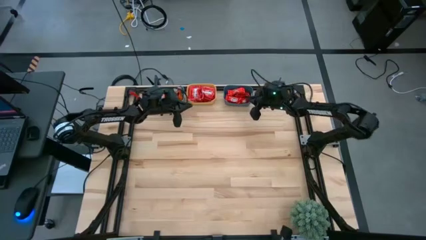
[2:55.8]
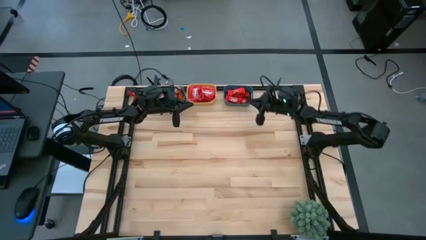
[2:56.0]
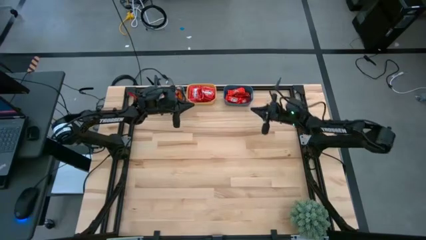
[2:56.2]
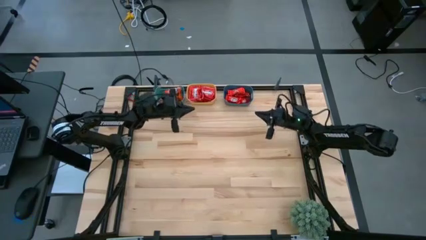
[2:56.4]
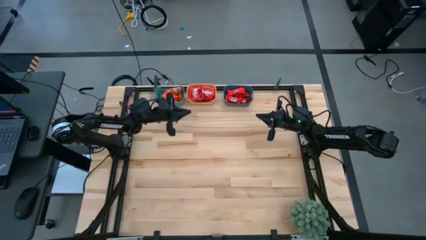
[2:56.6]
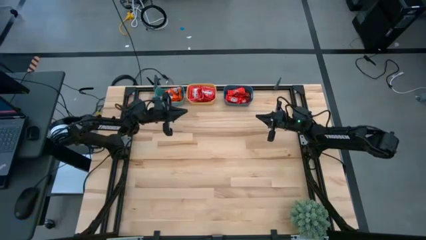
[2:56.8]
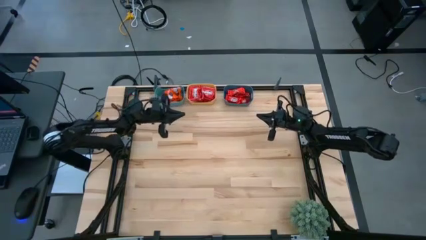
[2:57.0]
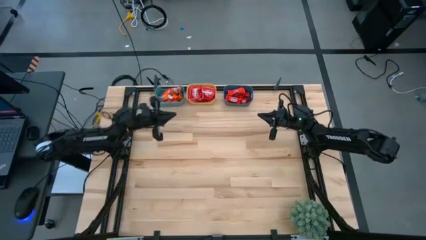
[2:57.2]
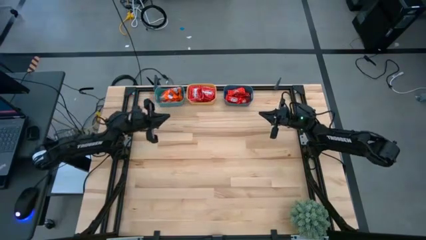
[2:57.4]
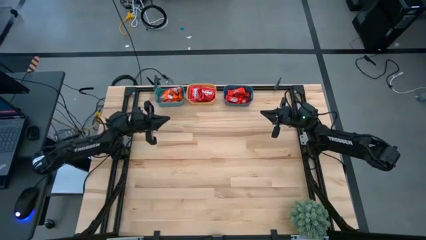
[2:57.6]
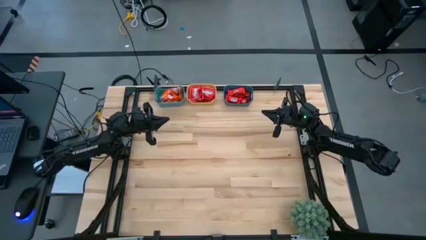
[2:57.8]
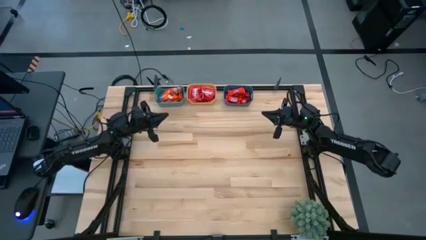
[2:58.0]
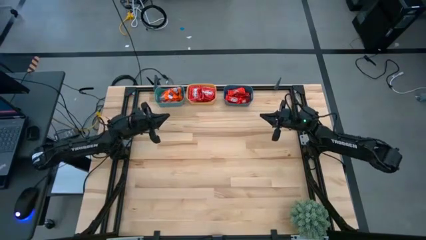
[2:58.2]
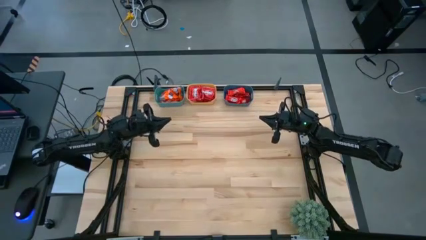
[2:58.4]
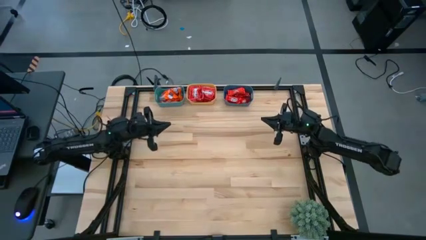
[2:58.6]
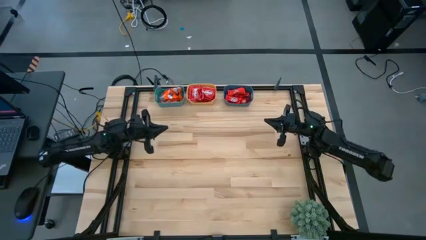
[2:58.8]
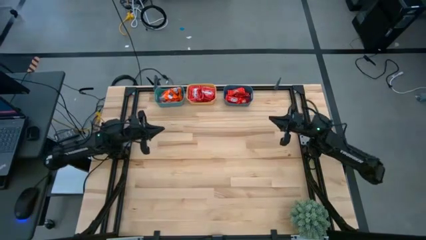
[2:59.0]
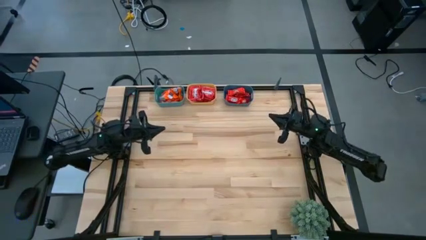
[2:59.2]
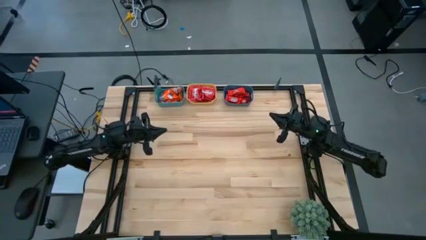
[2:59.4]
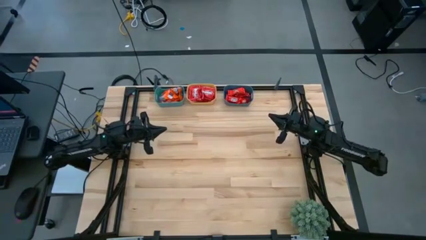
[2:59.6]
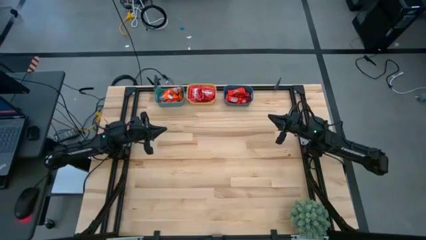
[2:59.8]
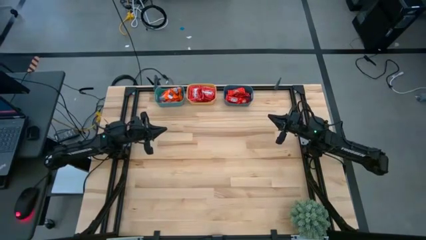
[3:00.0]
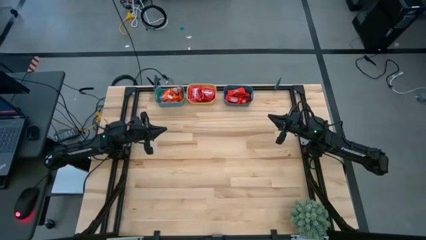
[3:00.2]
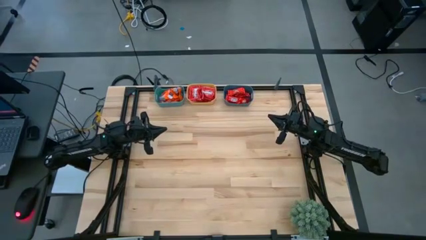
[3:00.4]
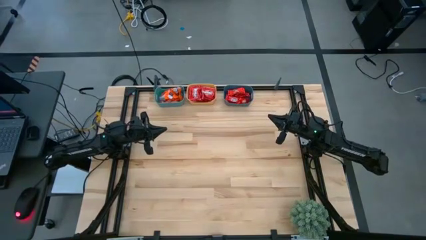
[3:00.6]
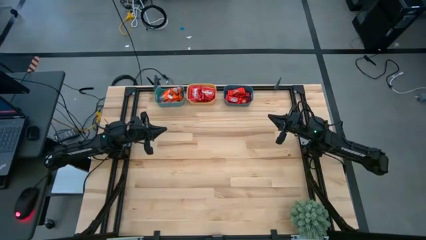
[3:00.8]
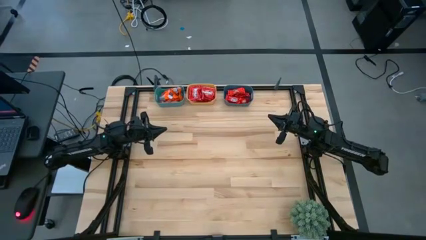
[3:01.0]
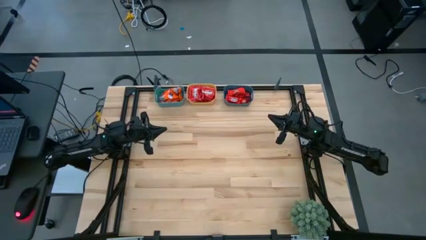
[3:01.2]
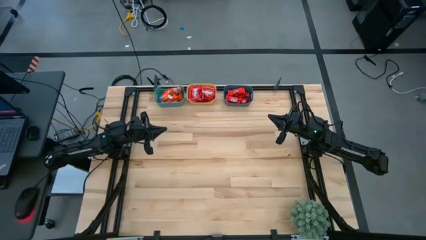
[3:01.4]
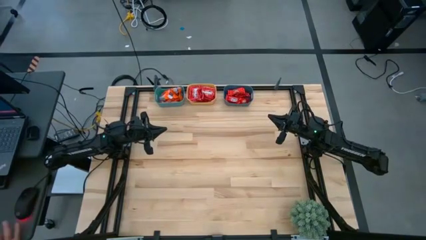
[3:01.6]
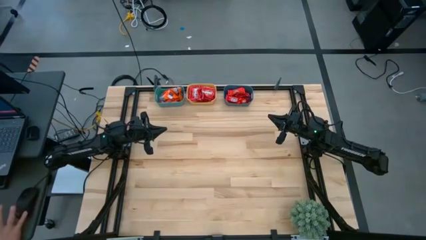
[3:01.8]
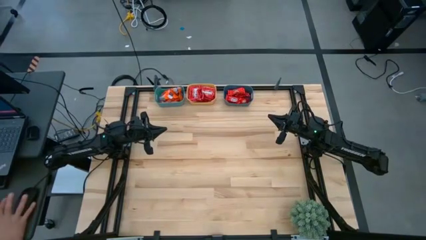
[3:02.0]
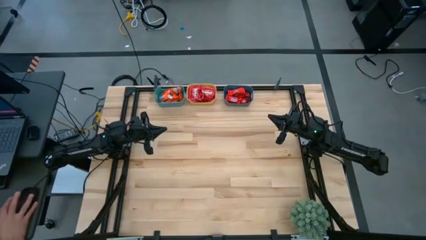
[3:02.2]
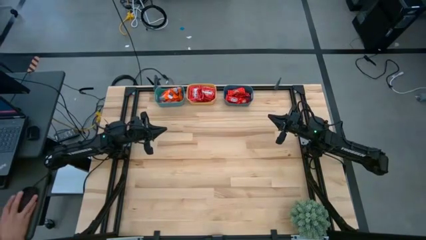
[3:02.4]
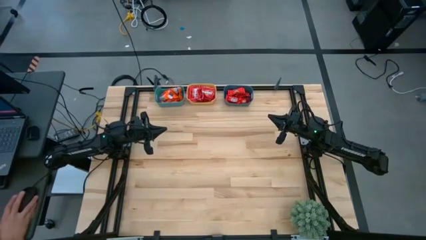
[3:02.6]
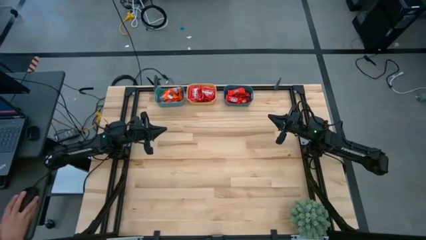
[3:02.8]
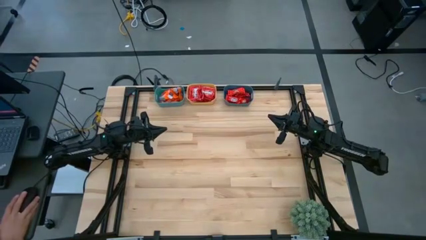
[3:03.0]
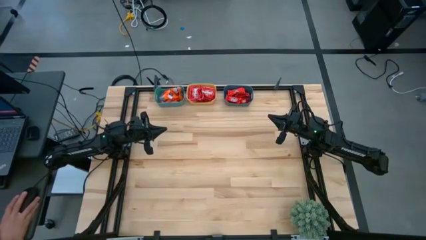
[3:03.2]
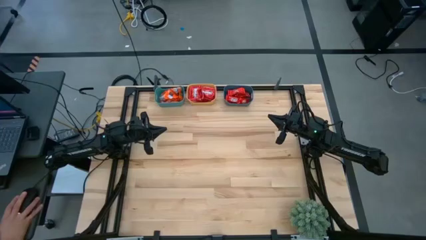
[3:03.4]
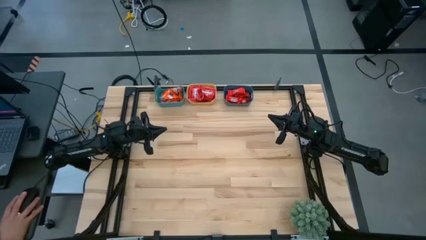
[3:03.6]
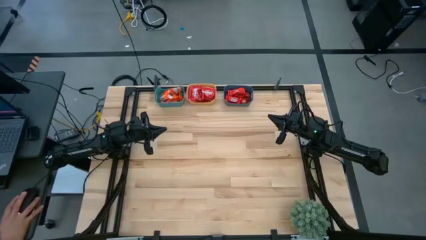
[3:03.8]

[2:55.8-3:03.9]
Task: Sort candy
Return to Home Position

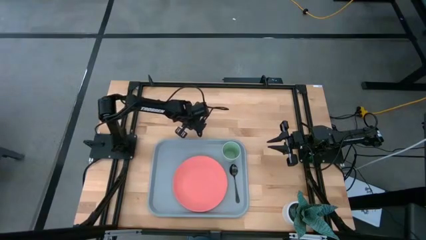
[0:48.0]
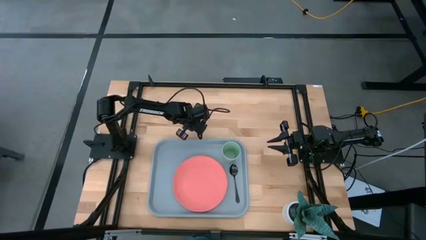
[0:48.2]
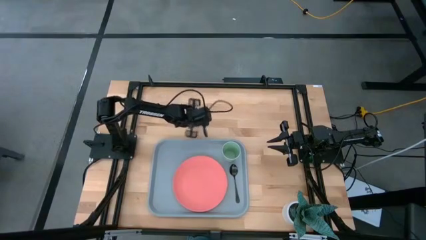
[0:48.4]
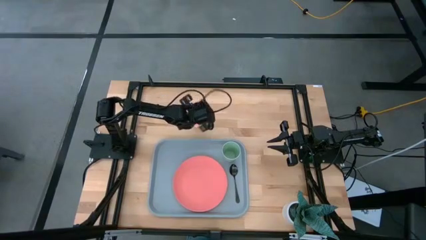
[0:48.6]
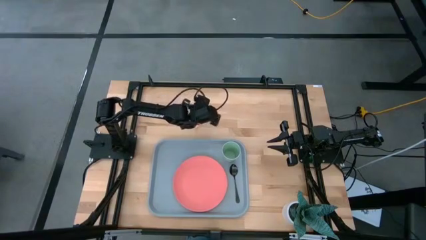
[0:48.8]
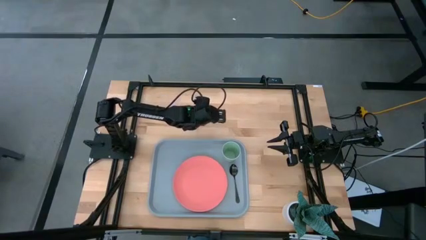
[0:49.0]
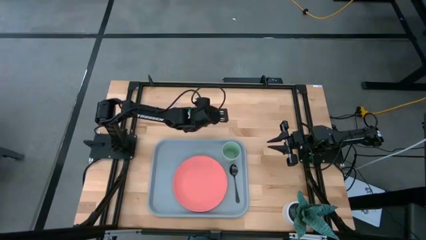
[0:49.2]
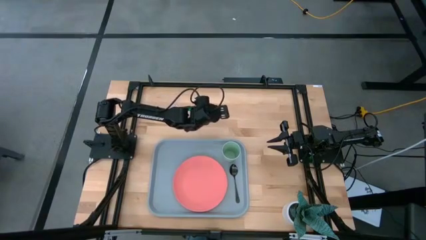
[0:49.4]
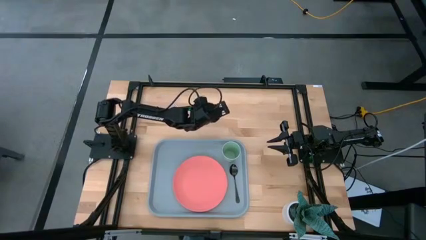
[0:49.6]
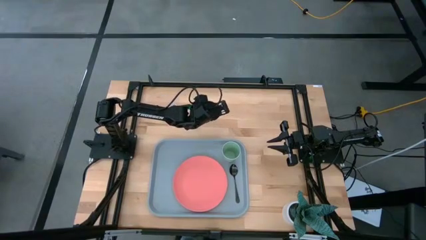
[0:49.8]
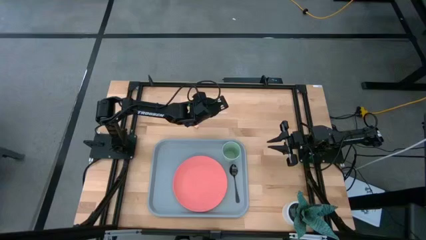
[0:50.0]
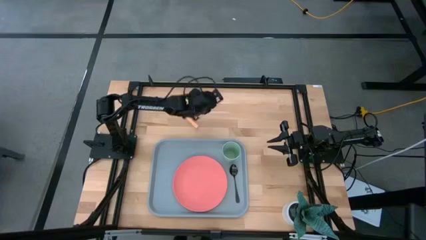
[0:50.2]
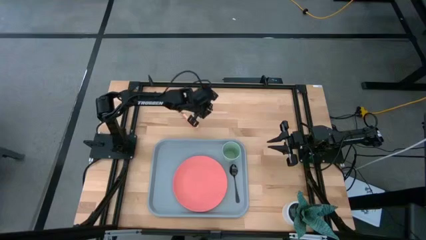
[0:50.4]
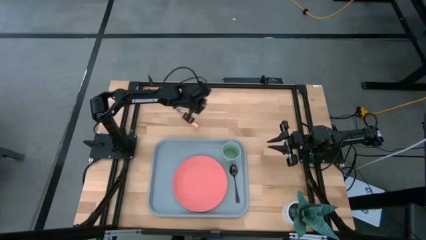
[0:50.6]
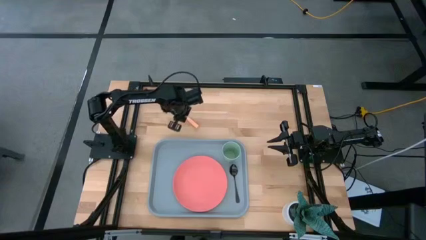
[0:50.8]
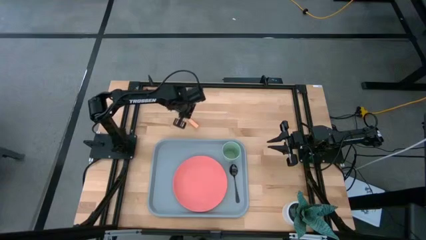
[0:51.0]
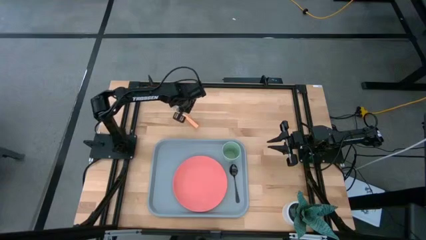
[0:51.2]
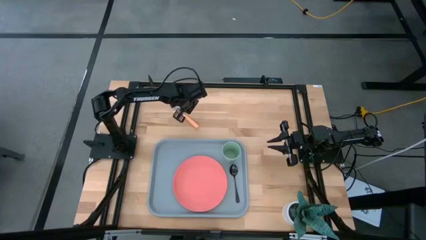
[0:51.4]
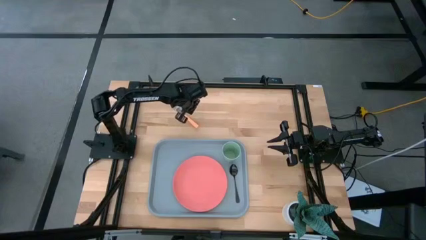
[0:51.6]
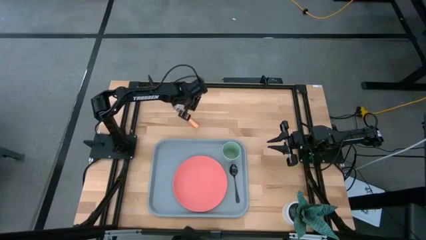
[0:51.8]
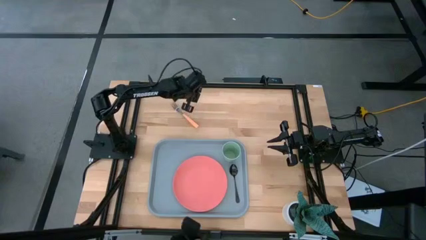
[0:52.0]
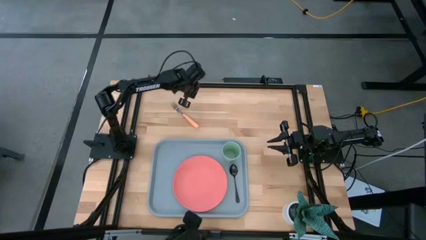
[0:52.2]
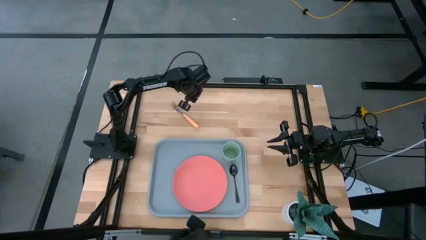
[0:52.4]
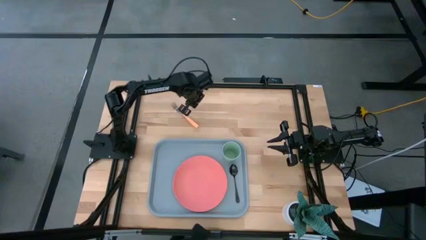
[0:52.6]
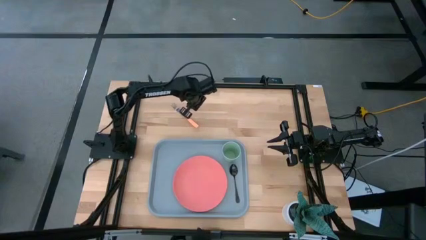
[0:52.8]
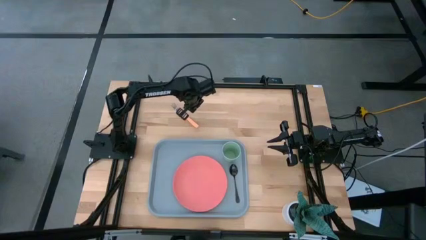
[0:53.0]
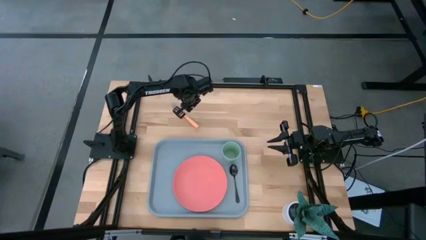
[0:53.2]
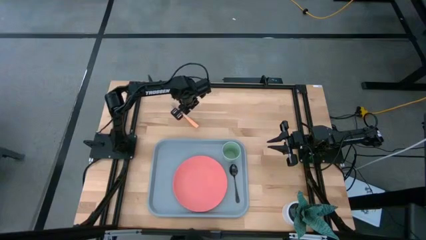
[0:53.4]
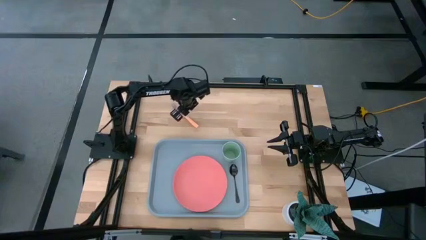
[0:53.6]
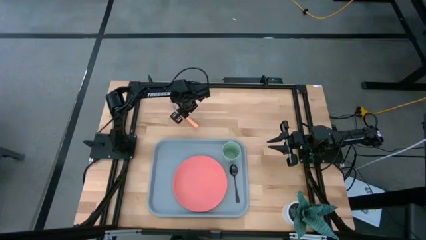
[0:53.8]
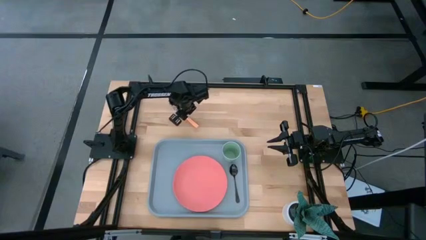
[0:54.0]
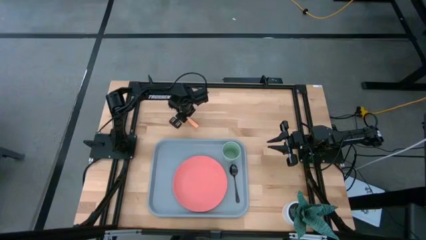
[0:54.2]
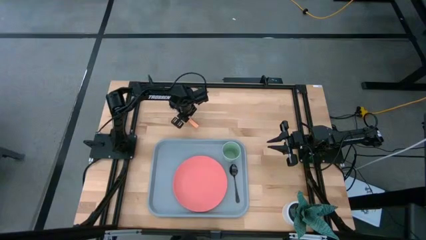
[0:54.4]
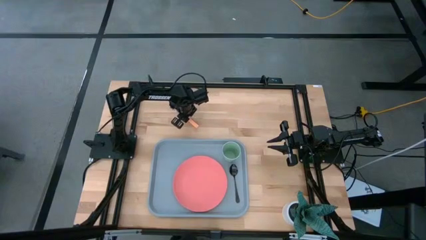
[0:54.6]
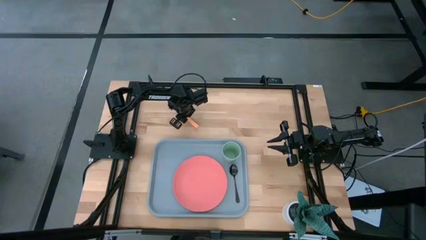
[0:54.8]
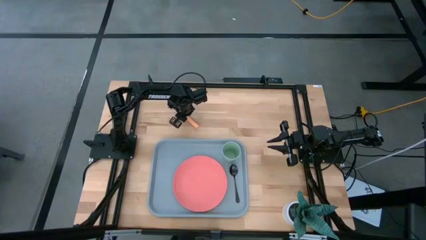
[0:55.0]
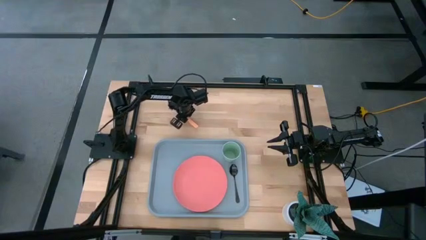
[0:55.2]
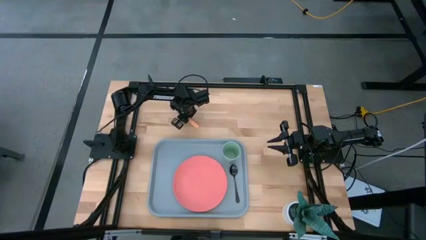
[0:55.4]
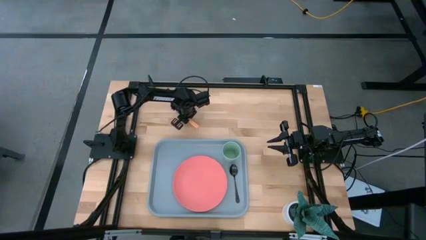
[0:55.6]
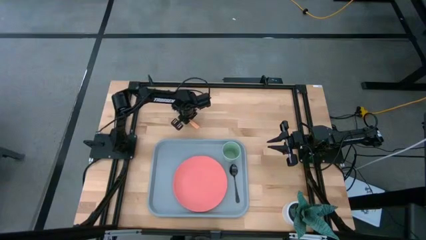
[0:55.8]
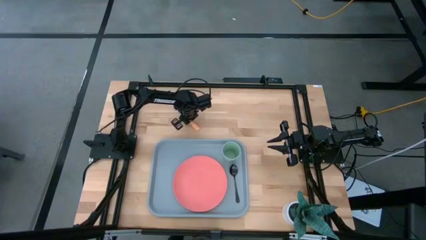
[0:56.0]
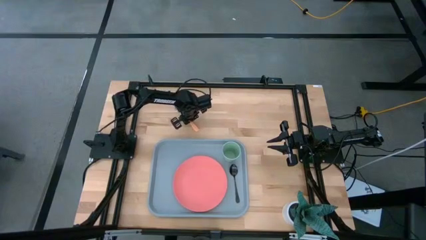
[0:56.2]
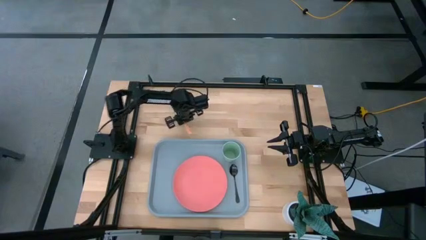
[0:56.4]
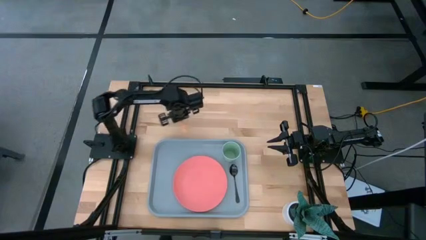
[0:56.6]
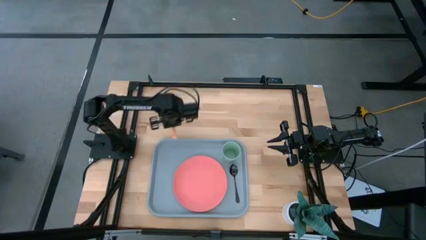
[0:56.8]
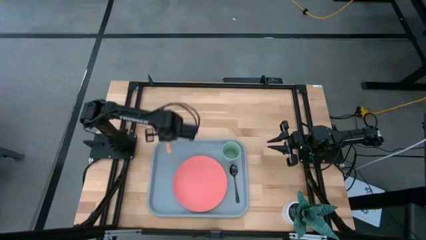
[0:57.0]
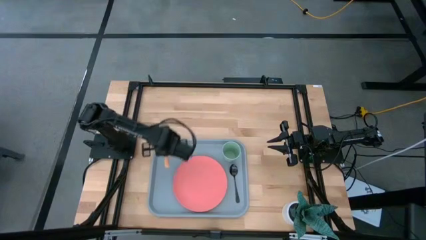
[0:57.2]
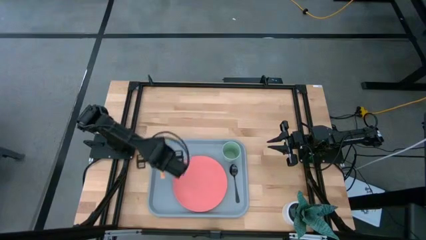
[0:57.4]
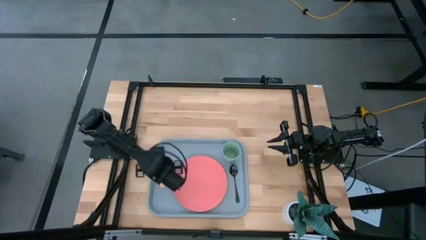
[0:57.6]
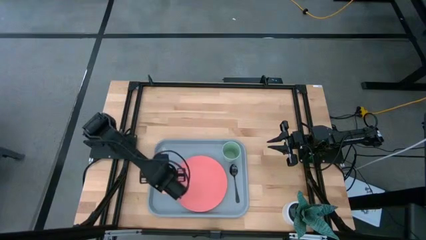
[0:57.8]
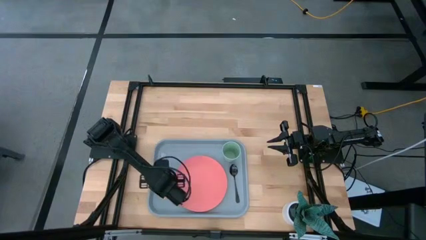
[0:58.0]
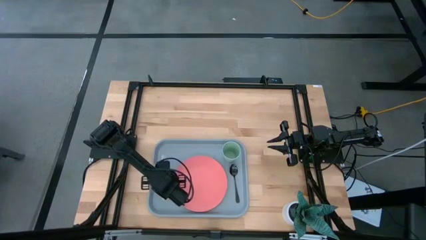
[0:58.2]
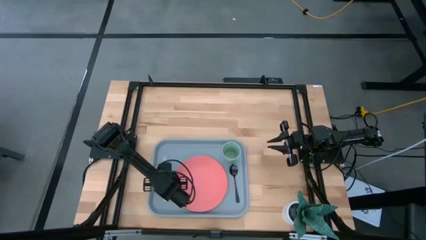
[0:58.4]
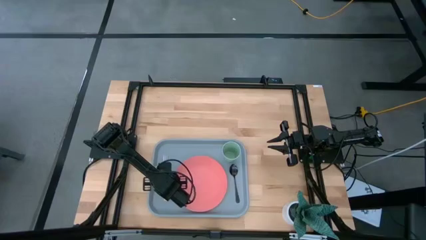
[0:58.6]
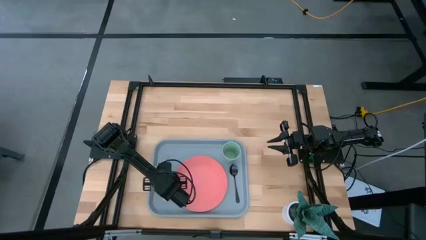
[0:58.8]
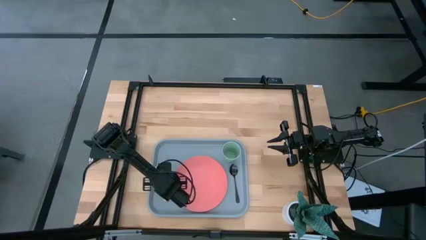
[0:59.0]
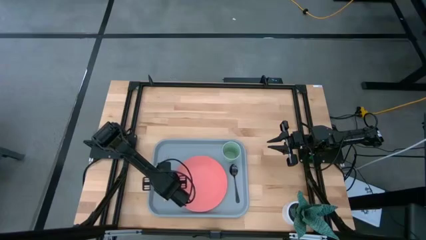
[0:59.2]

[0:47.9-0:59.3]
Task: Pick and place plate/cup/fork/spoon on tray
Put the orange fork on the gray serving tray to the left of the pink plate
